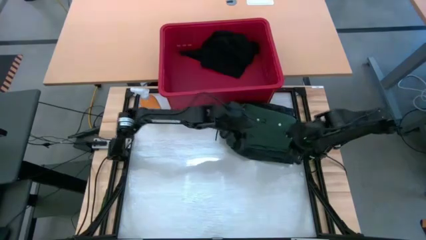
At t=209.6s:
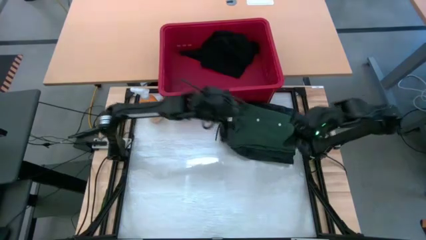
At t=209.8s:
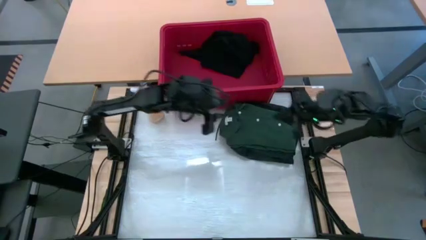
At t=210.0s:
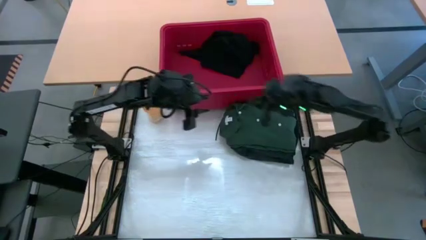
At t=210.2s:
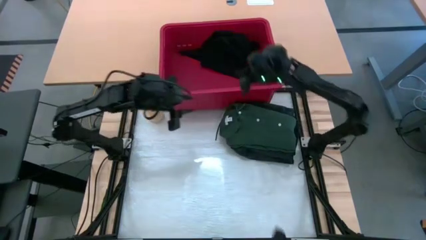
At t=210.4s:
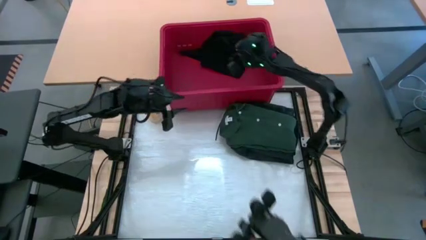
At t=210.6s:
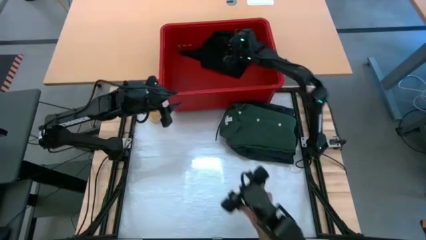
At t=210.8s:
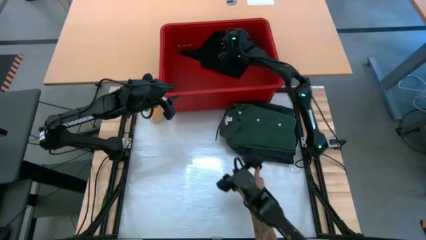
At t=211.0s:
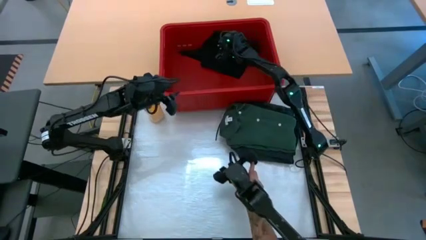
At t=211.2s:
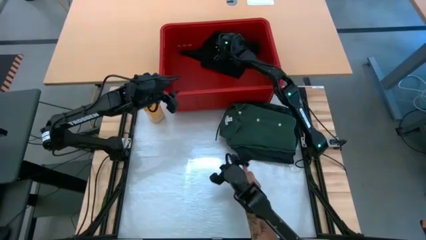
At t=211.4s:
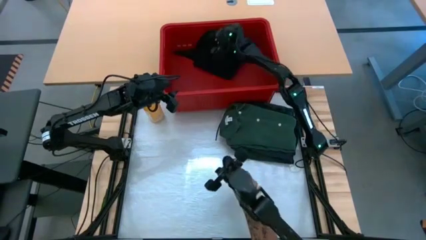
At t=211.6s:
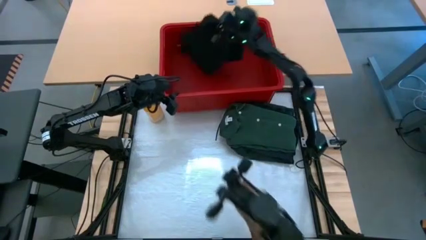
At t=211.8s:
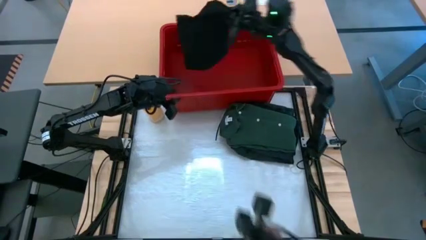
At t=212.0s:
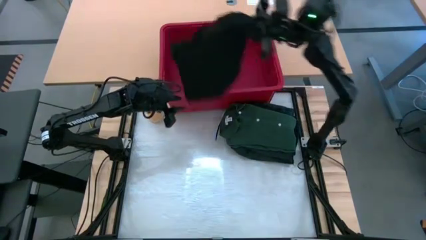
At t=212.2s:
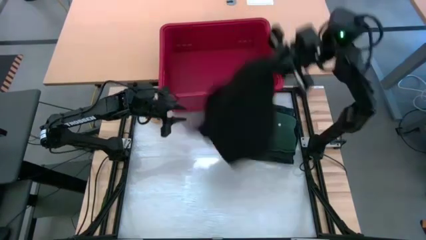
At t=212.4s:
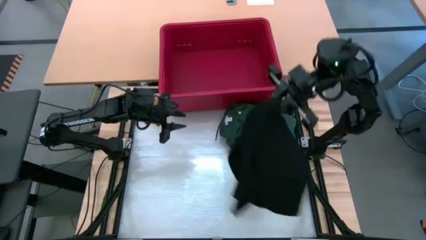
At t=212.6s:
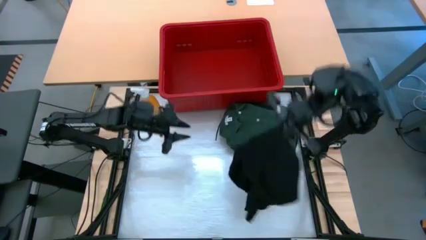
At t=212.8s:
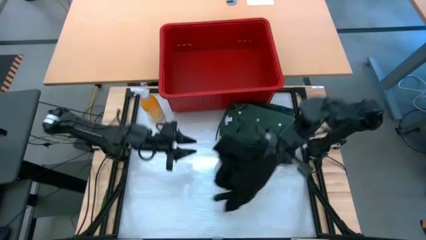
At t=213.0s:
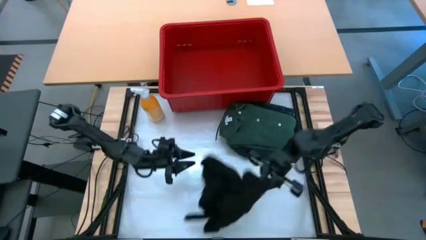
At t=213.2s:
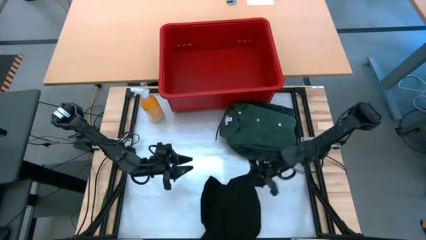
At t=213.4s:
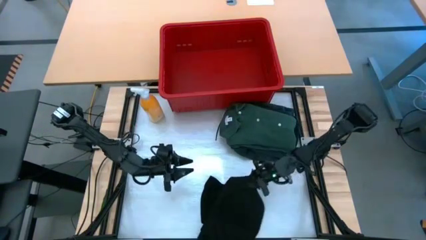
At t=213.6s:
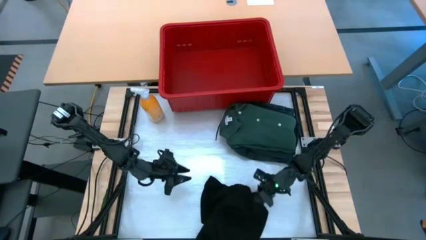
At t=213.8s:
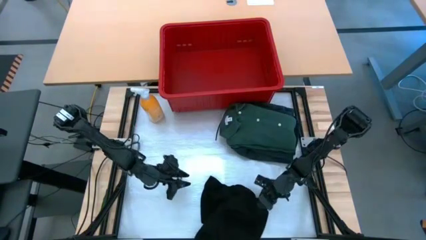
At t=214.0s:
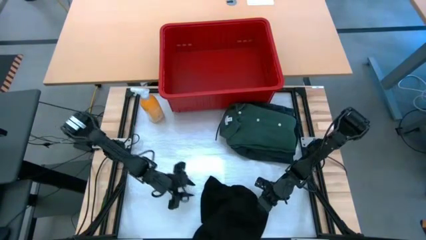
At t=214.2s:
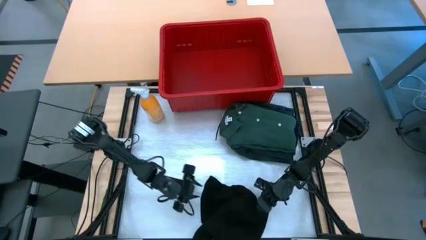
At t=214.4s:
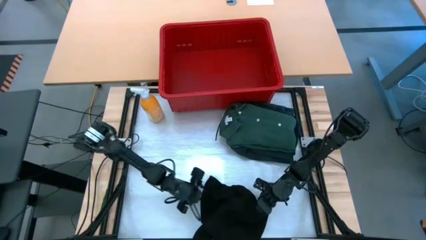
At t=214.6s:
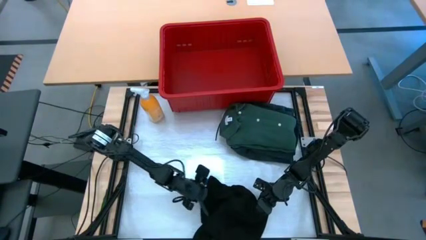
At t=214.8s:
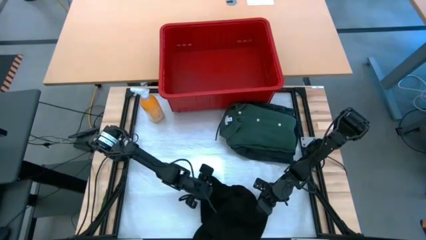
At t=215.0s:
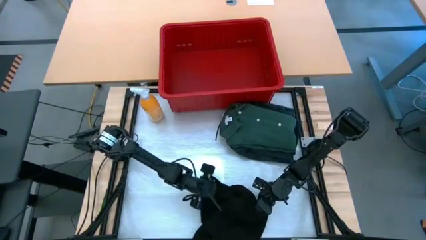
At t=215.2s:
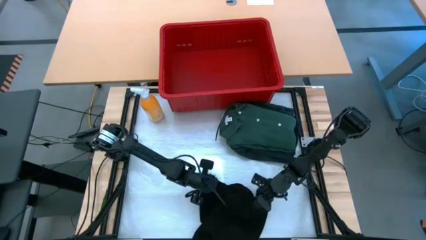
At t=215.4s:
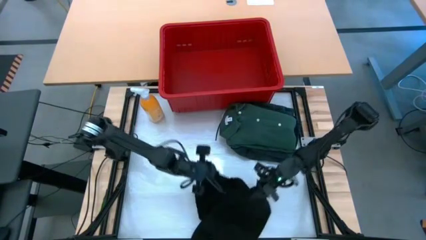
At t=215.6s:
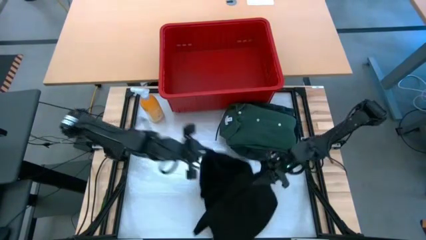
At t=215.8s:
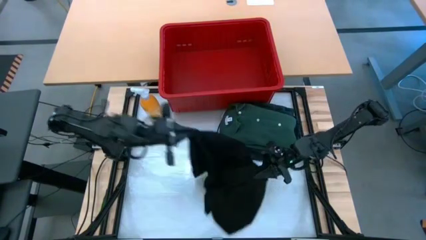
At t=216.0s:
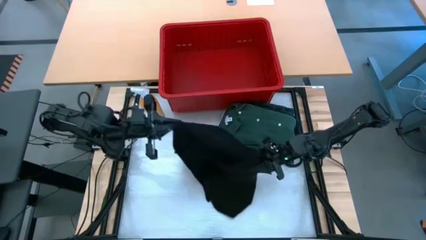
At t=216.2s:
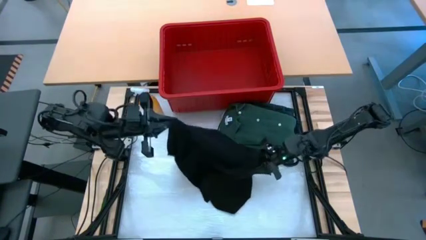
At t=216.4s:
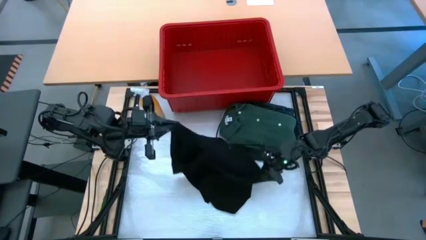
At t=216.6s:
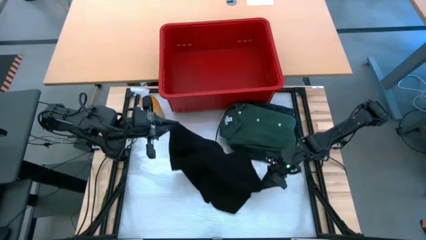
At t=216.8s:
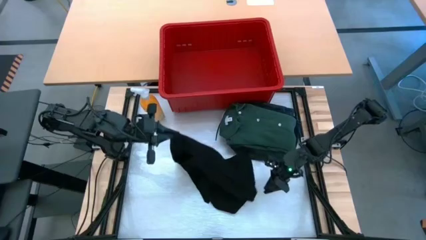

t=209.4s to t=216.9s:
Task: Fold laundry
Remove the black shirt from the red bin

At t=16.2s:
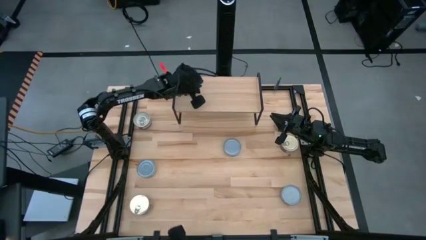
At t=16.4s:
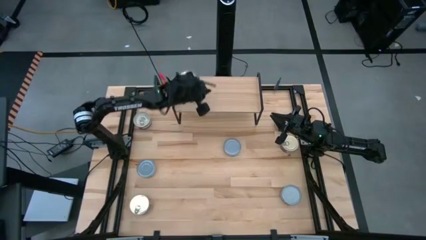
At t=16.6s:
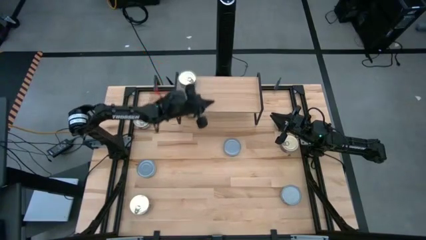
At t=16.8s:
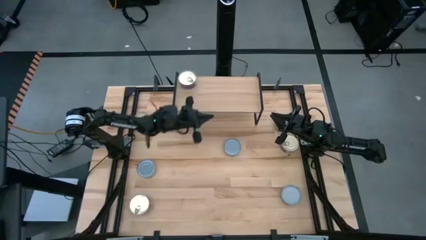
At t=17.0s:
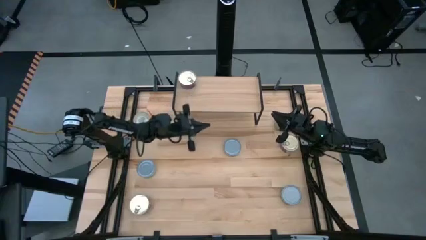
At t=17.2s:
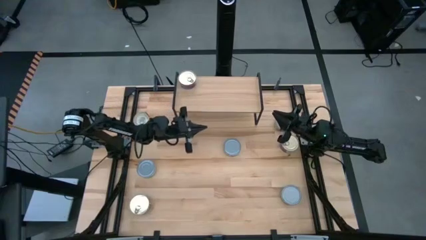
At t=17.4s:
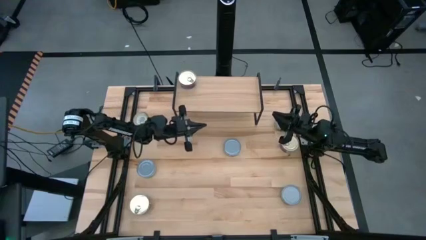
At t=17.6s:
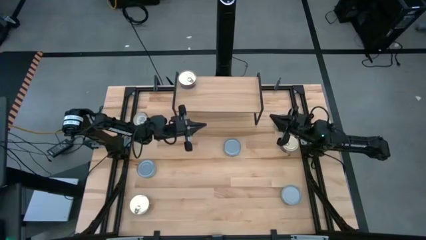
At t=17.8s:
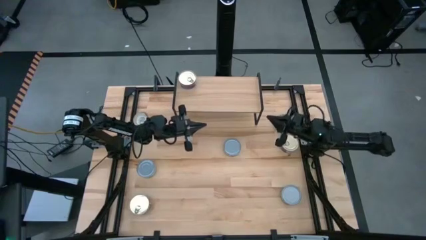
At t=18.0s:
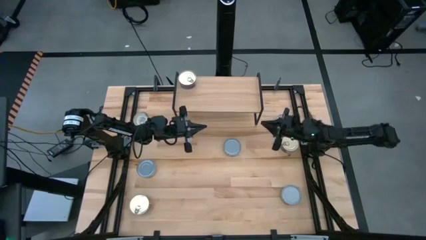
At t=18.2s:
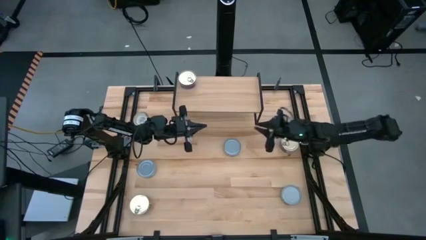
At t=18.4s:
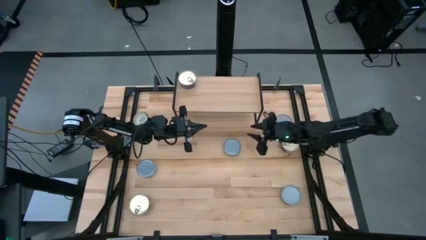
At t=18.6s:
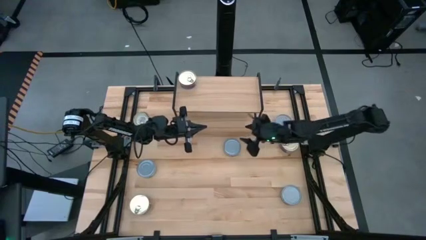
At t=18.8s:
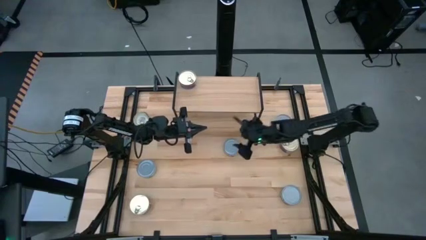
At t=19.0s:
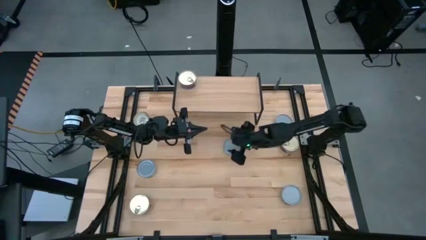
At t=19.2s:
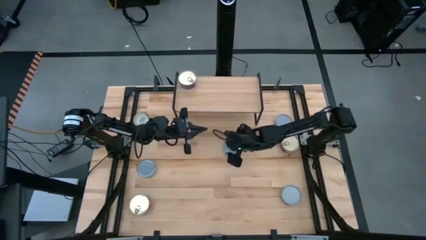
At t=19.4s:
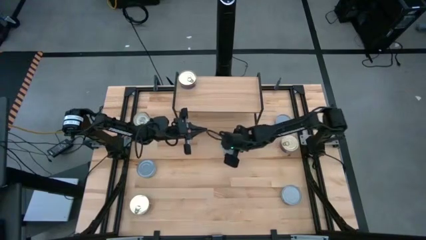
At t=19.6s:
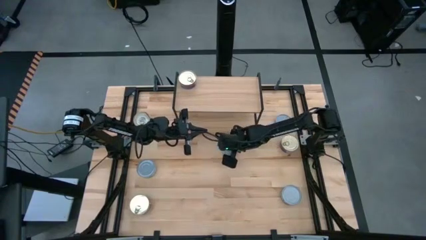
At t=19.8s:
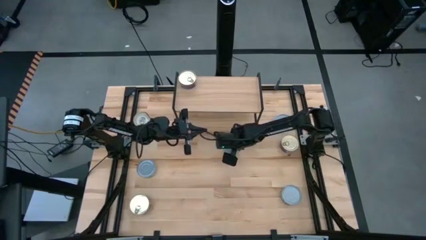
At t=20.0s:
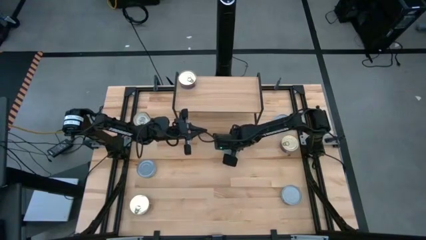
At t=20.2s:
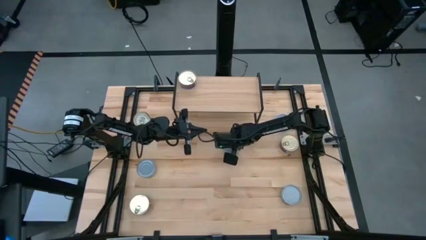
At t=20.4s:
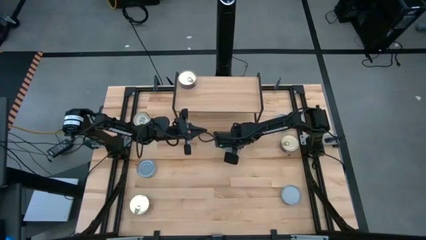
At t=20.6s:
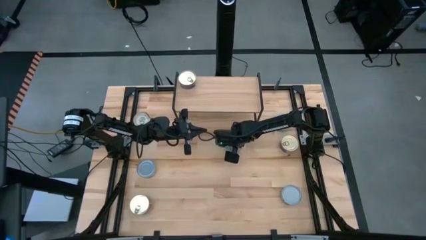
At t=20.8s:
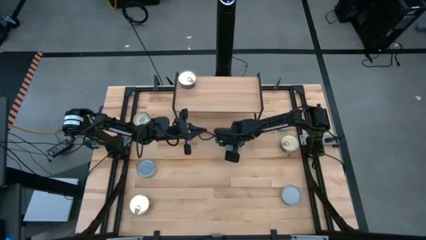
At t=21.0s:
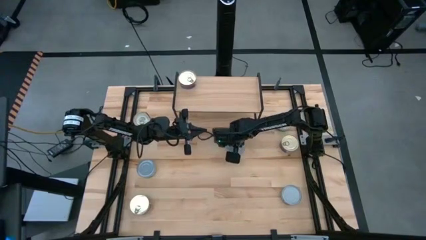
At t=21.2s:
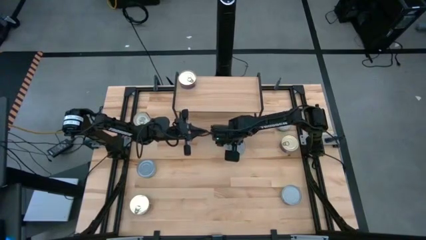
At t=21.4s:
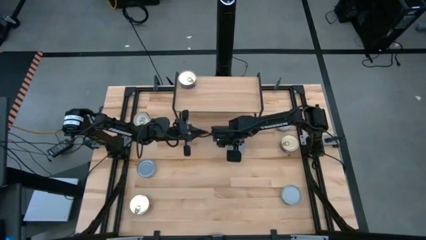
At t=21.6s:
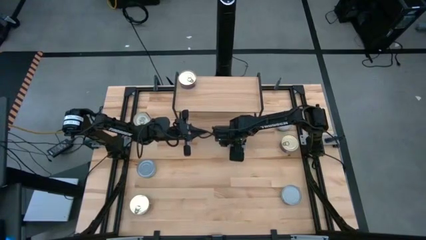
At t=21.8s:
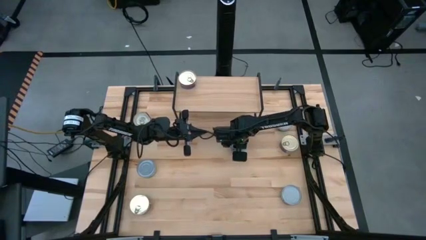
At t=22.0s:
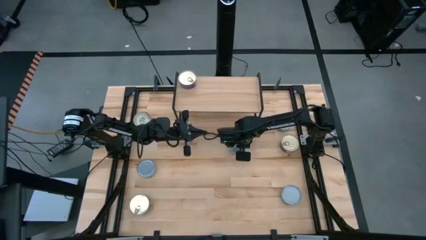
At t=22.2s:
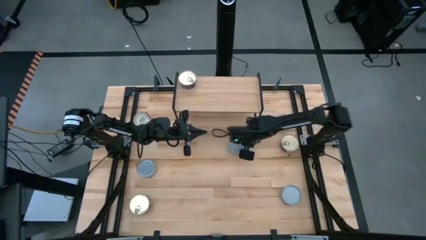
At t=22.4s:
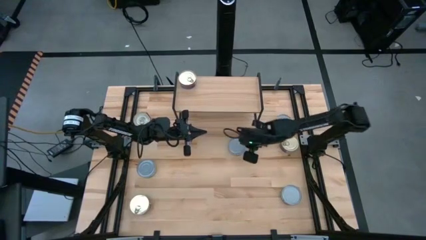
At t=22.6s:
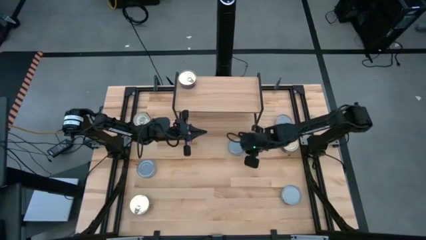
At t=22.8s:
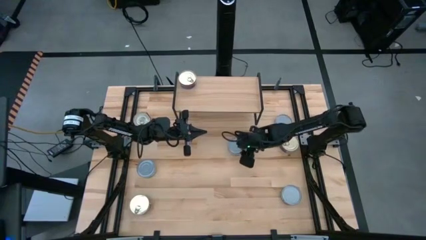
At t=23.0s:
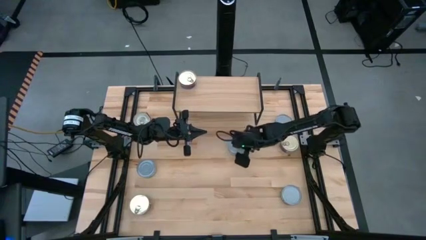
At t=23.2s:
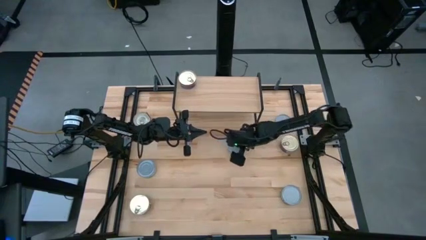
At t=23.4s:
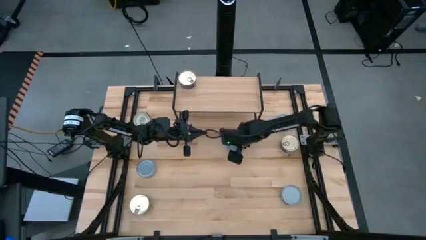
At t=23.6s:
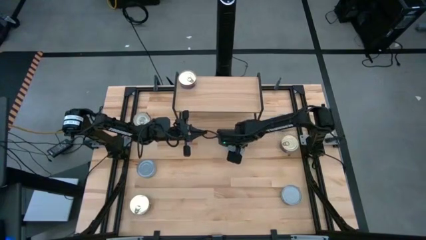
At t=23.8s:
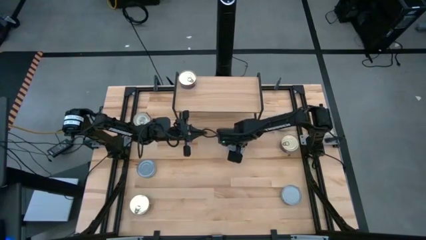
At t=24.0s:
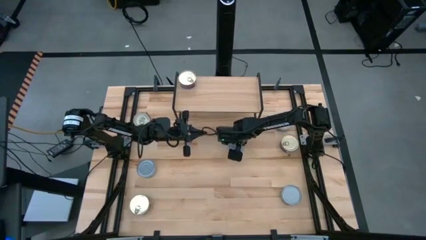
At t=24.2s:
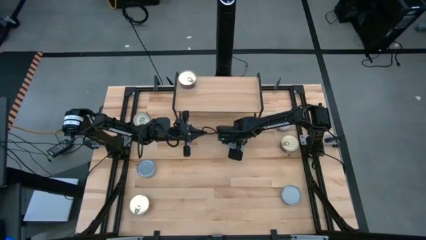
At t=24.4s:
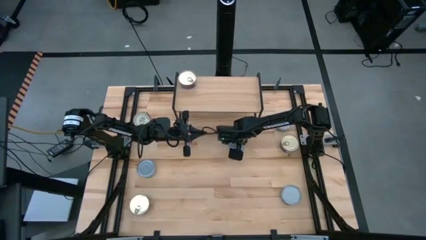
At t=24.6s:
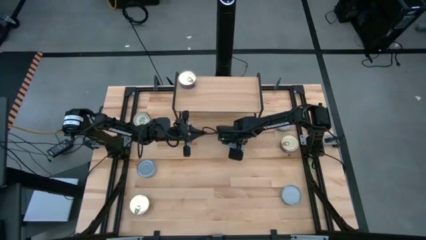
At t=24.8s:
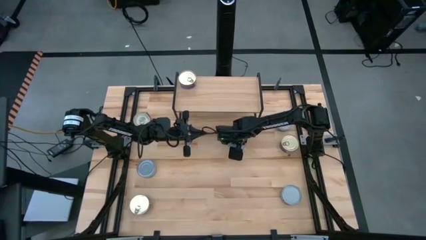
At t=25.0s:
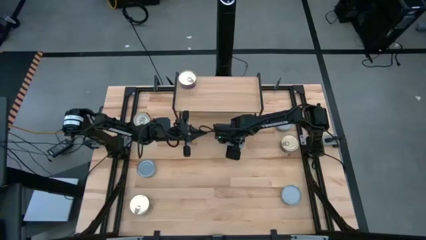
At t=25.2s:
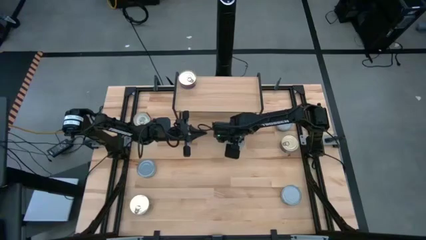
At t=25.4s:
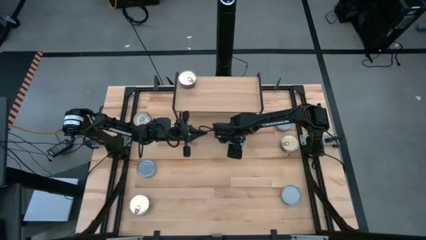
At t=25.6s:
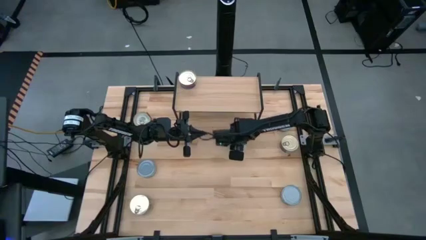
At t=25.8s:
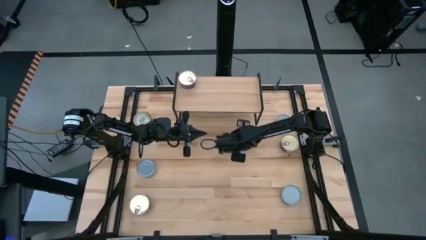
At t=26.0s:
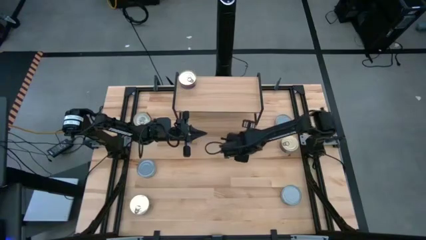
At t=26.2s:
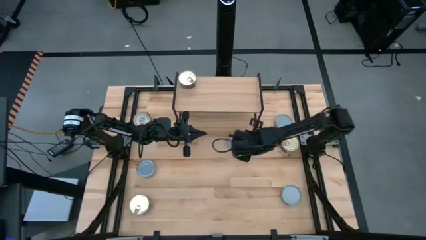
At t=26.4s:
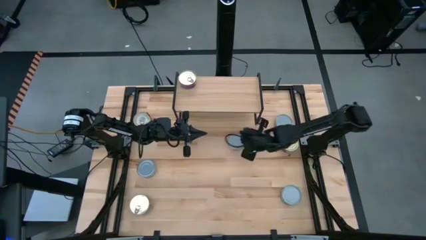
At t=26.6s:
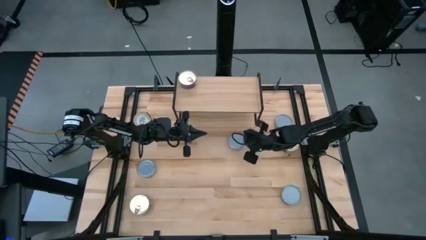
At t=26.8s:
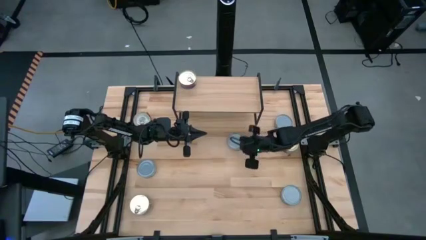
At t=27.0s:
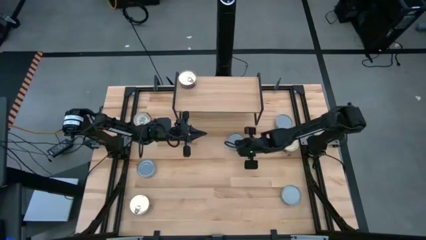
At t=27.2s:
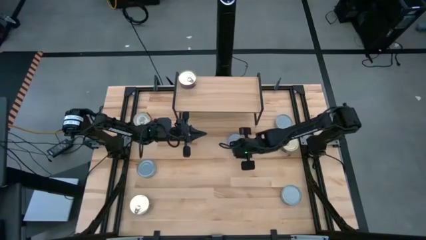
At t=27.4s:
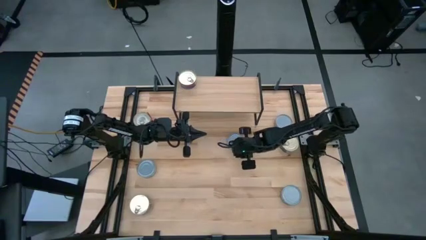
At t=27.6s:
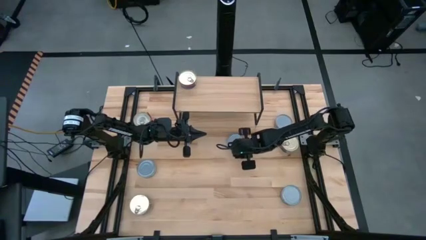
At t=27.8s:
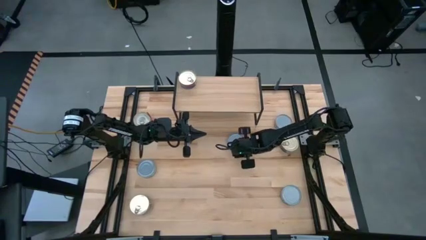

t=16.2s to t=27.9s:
Task: Stack canned seafood by type on shelf
Put the center green tuna can on the shelf
